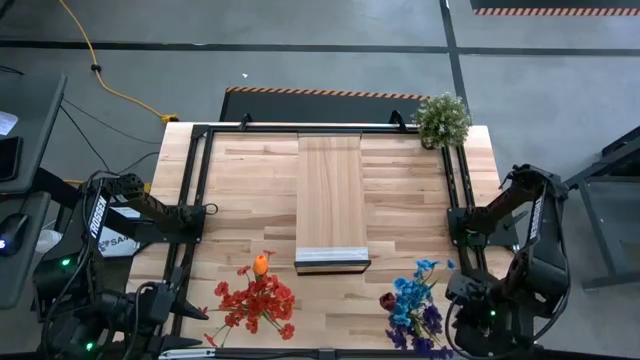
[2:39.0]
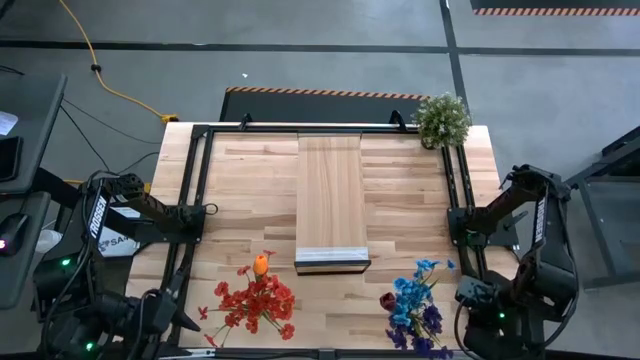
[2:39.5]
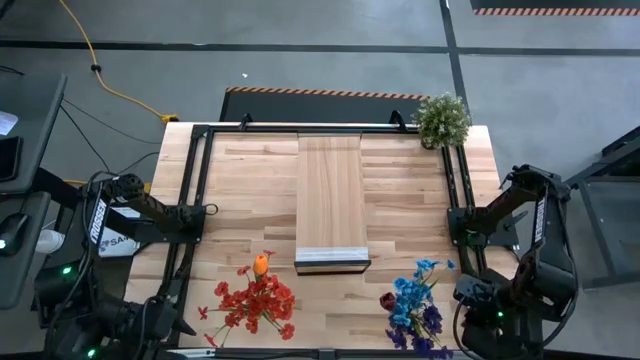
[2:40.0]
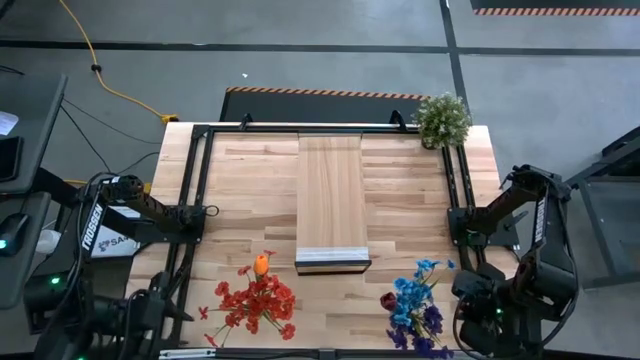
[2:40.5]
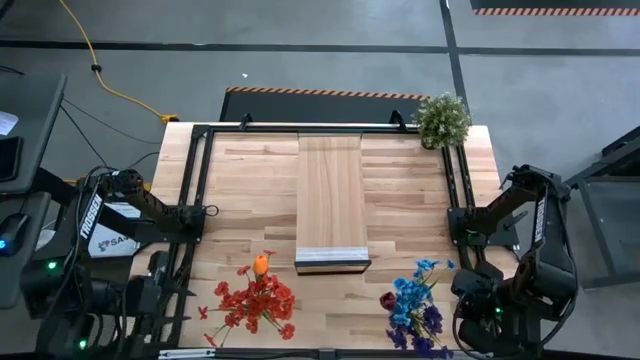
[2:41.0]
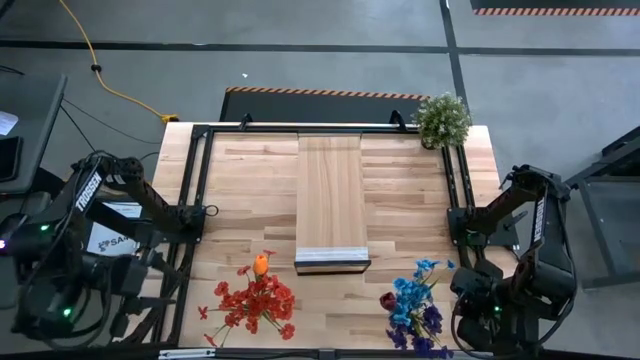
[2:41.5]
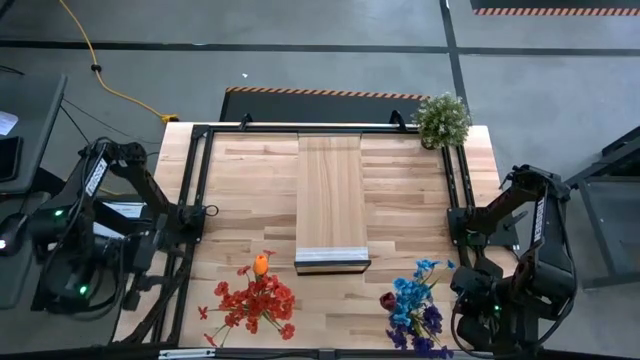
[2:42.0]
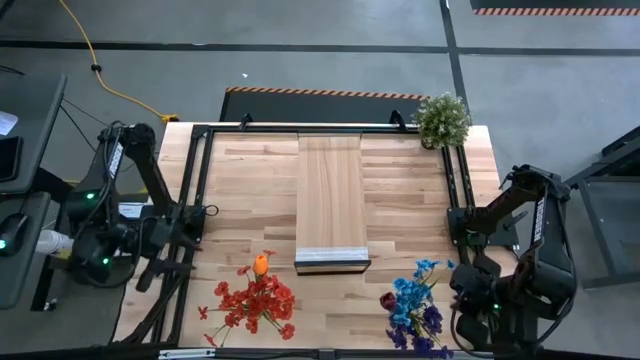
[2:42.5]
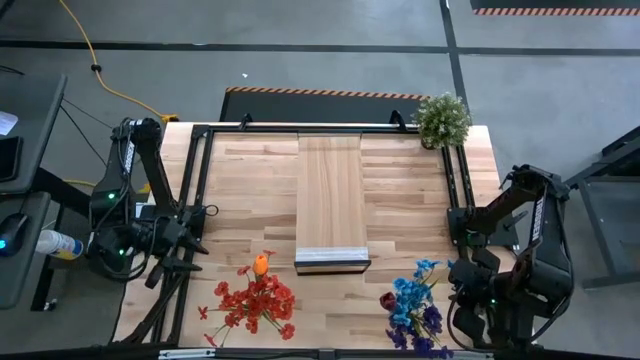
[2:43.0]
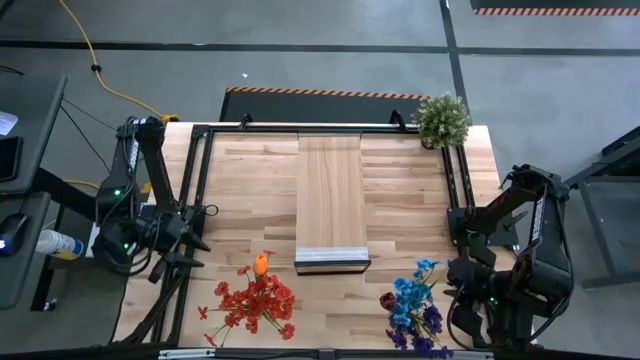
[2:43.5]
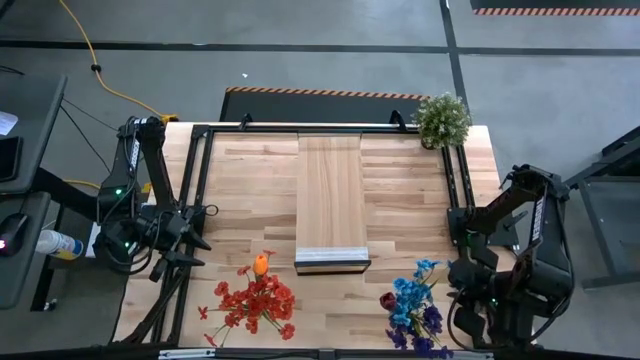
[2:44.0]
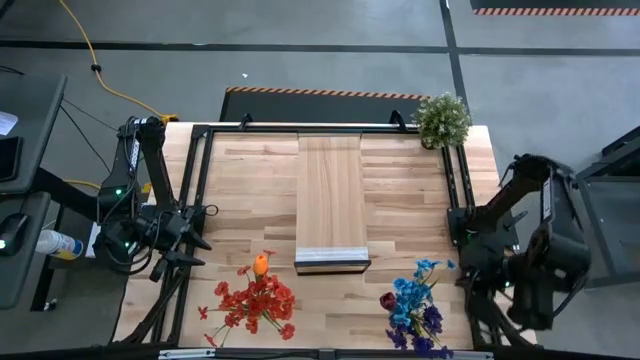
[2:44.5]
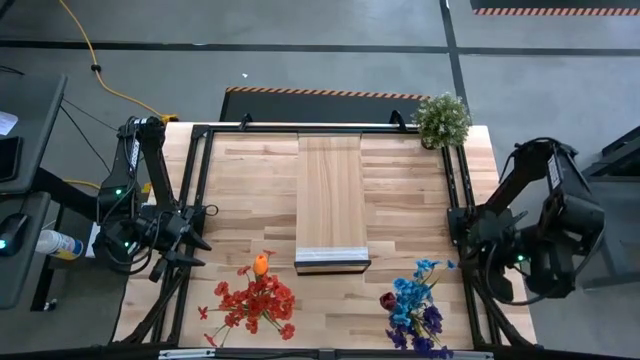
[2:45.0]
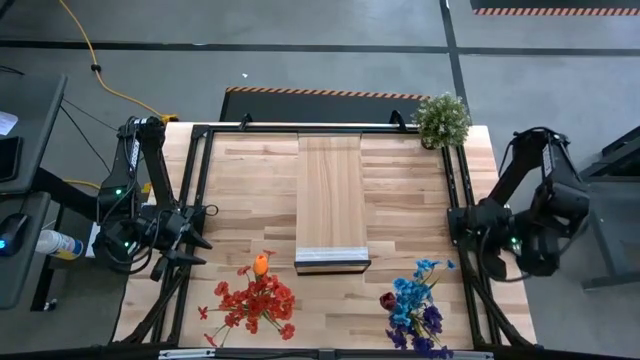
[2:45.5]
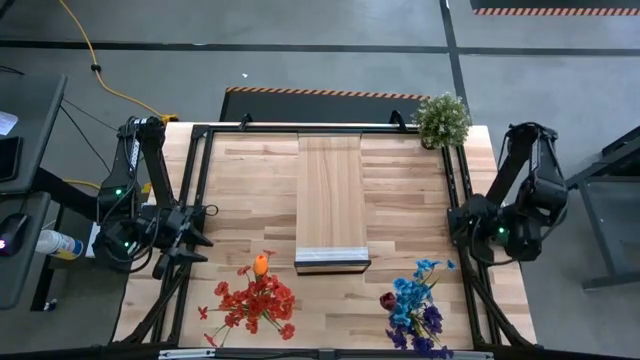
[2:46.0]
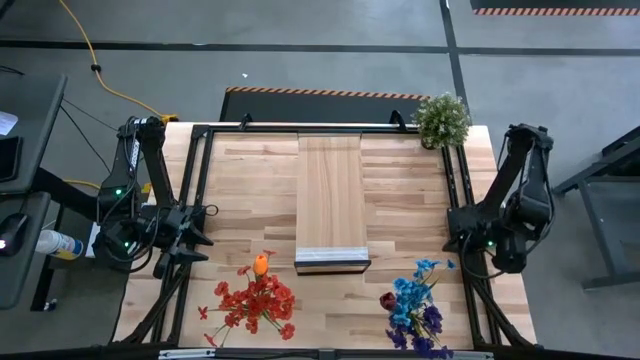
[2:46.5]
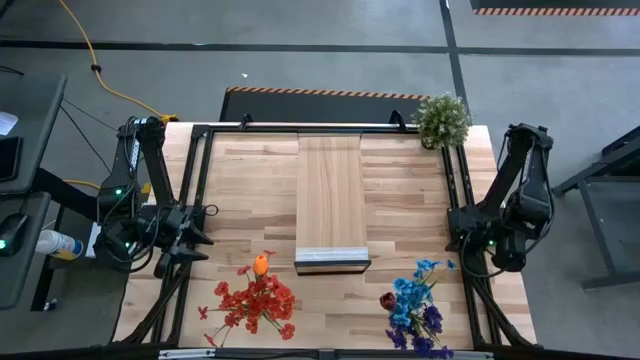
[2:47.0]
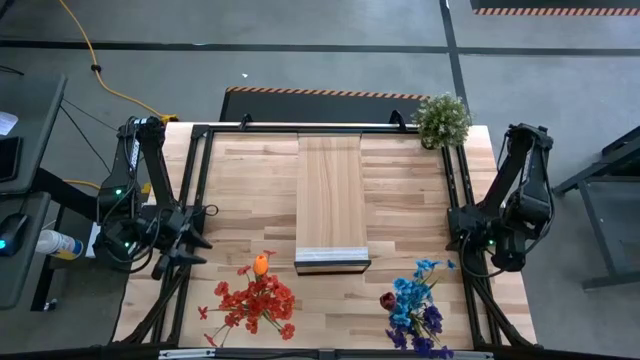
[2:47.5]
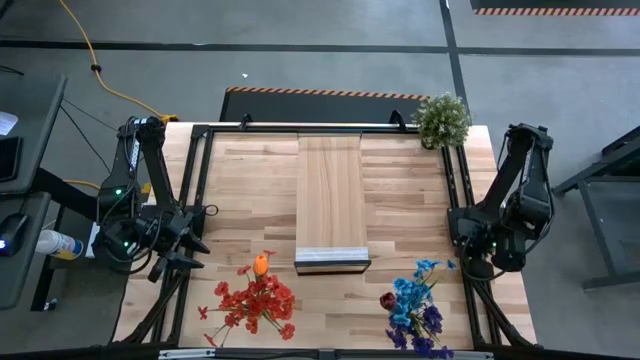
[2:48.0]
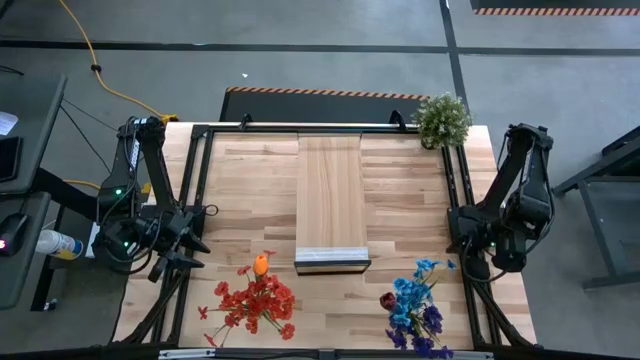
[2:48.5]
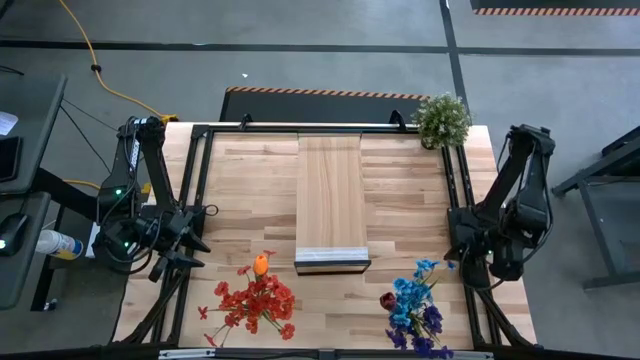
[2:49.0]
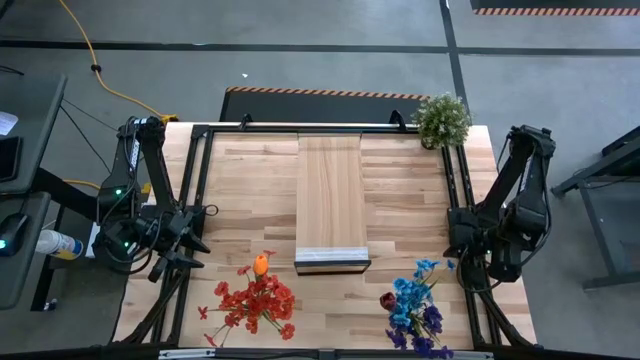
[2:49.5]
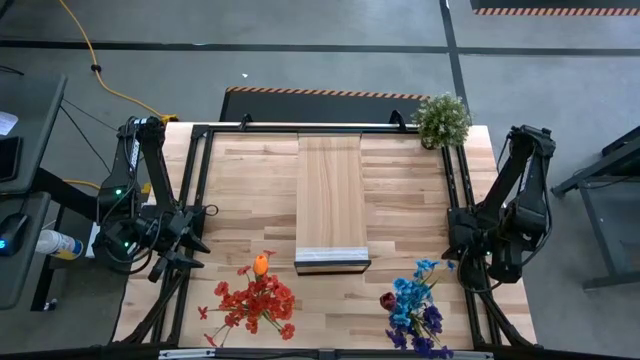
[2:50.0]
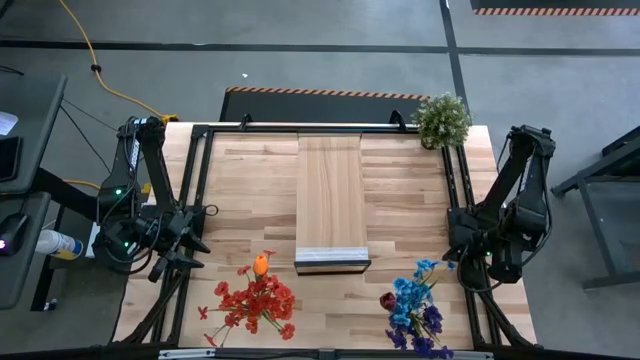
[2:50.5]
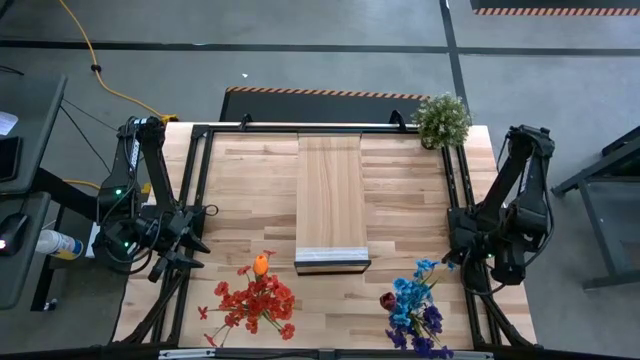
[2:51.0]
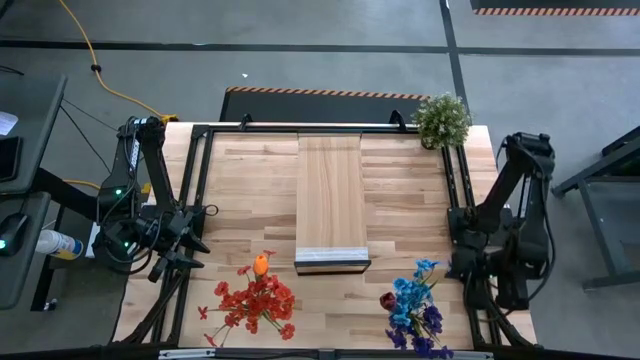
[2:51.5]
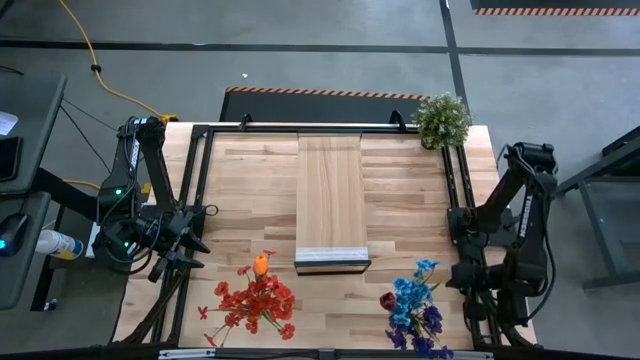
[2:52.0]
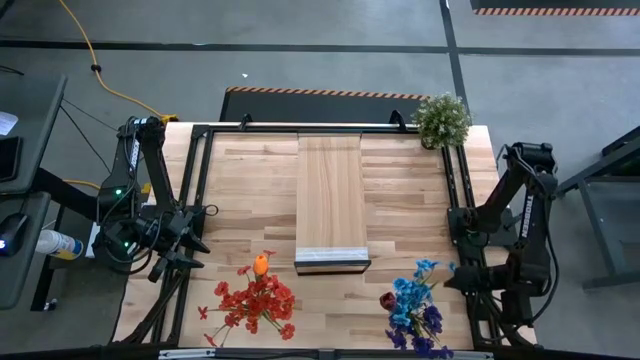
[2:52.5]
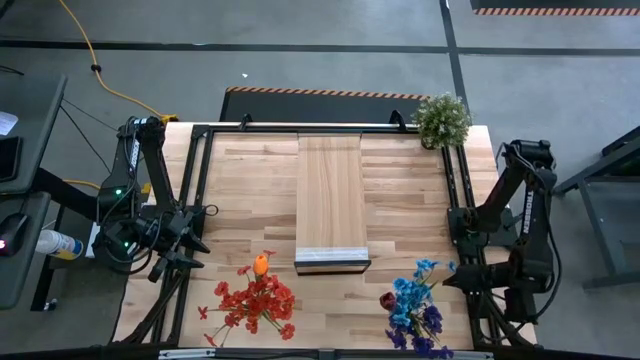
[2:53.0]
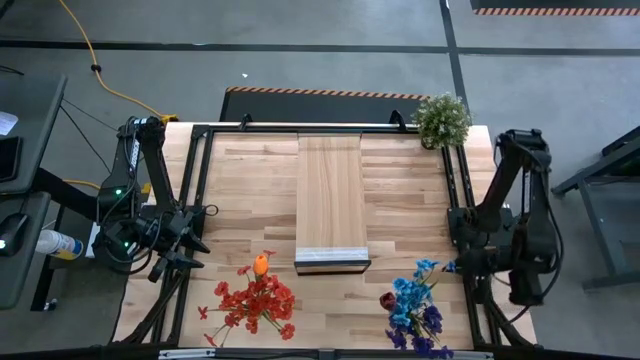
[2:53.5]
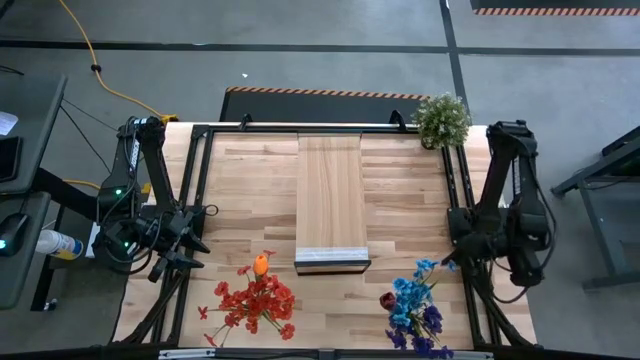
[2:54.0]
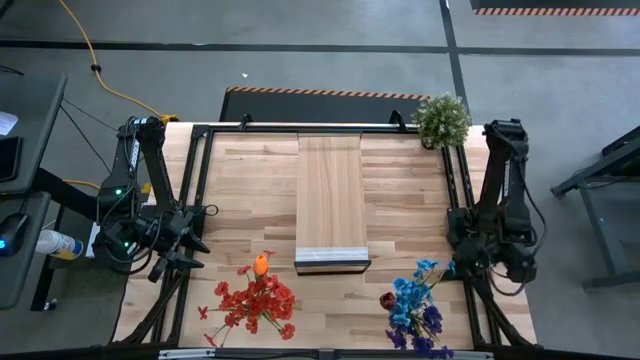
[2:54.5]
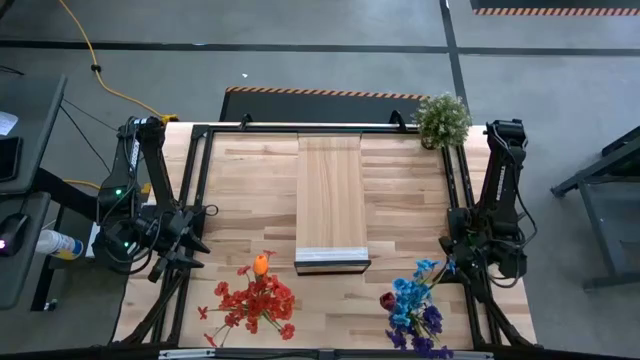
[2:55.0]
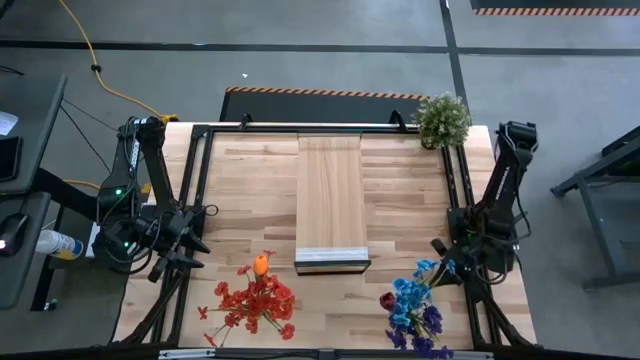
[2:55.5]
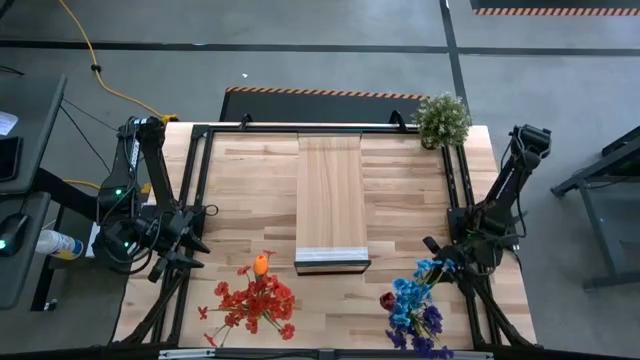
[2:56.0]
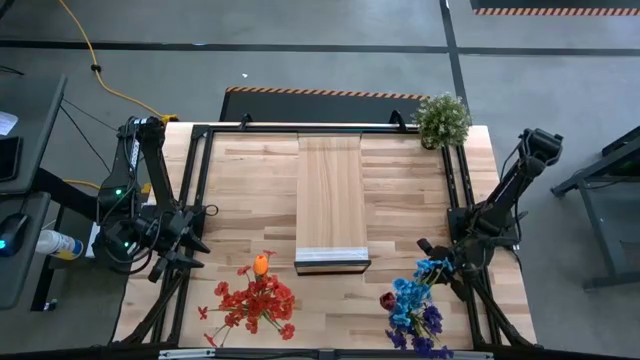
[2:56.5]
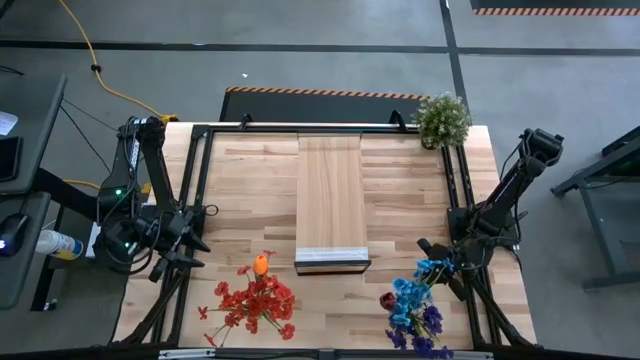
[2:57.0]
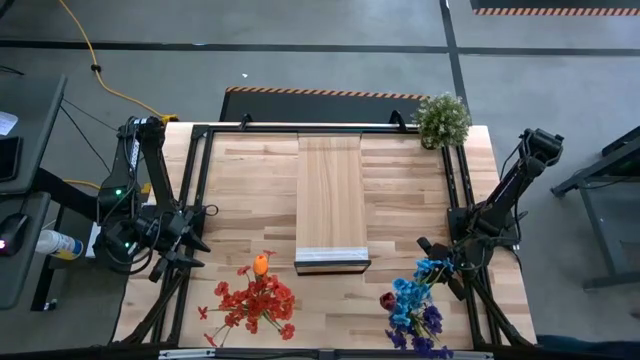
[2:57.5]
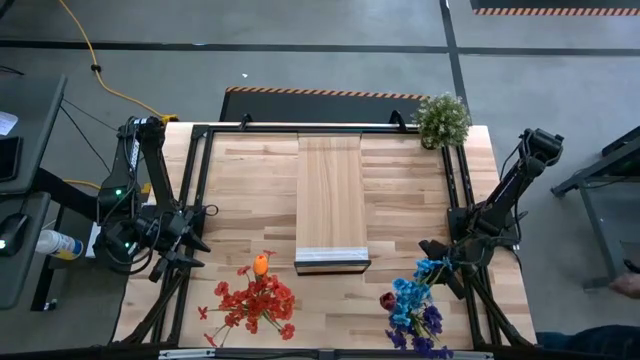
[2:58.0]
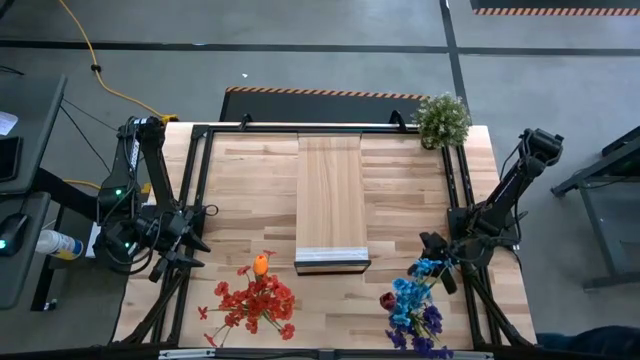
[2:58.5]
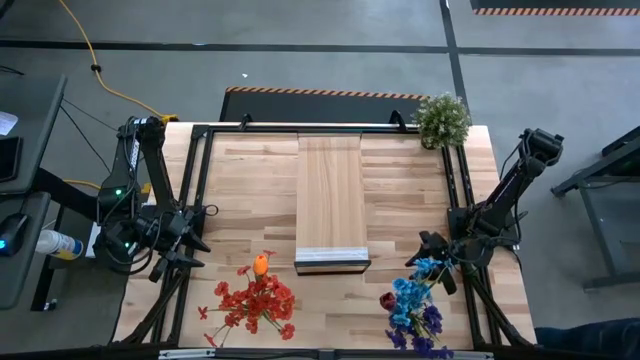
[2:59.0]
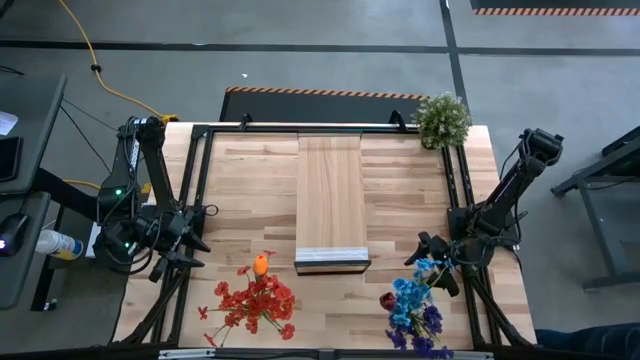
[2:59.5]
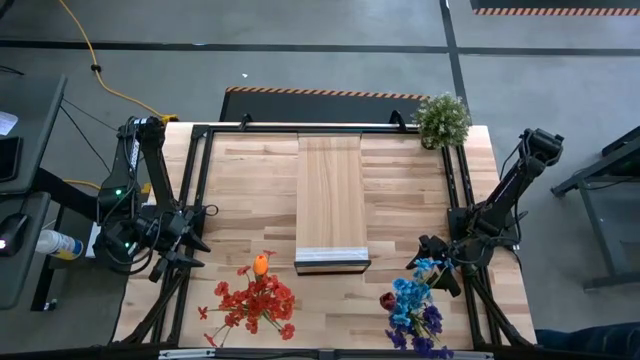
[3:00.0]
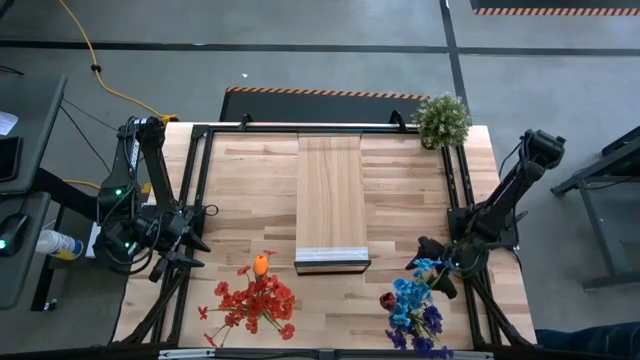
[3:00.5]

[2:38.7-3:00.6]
Task: Pick and place flowers into a vace then onto a shelf
Put the right transparent vase with the flowers on the shelf

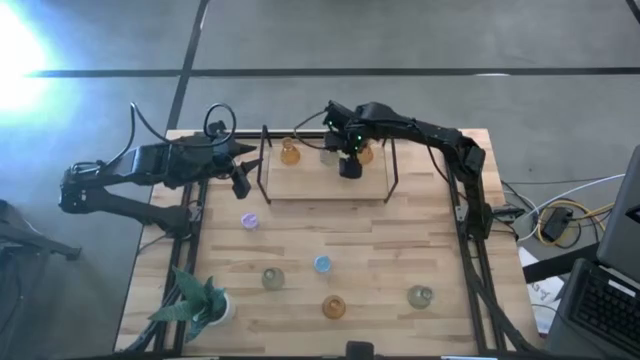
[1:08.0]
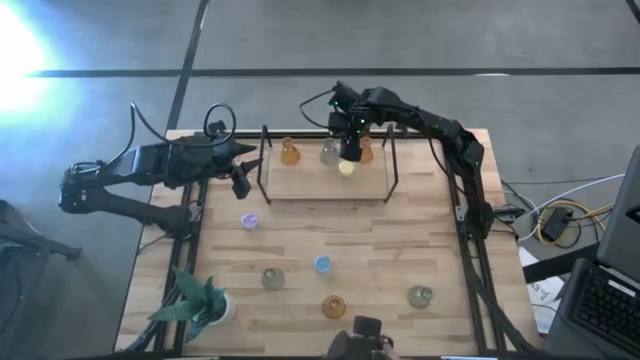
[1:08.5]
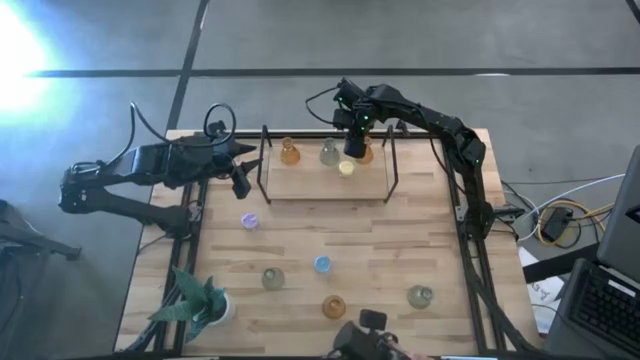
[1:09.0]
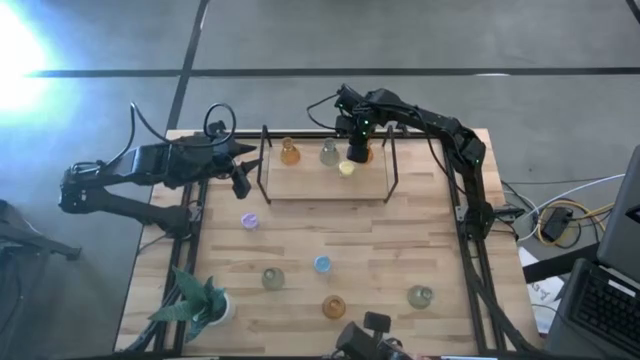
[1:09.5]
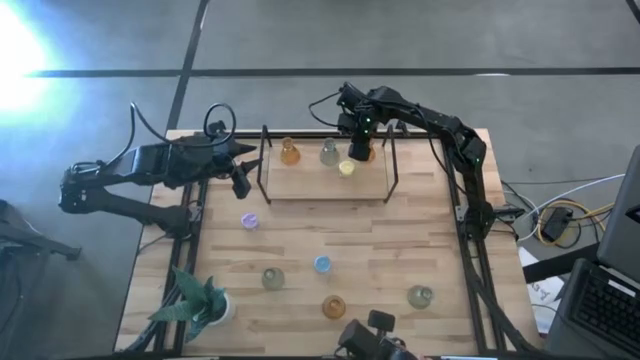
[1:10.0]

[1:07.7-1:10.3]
Task: Pick & Place candle stick holders
Adjust the yellow glass candle on the shelf
